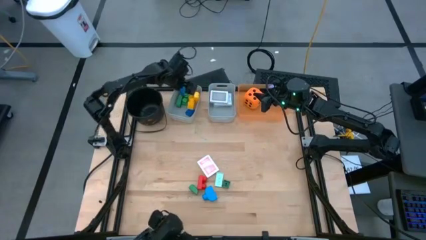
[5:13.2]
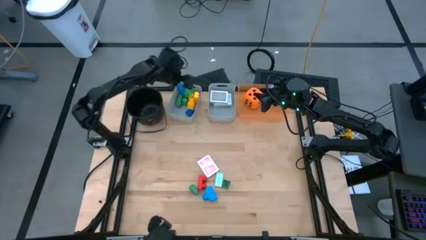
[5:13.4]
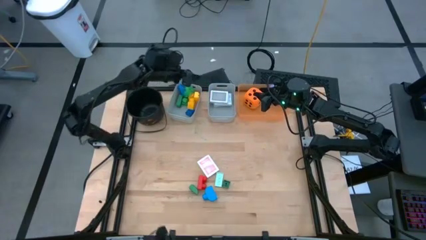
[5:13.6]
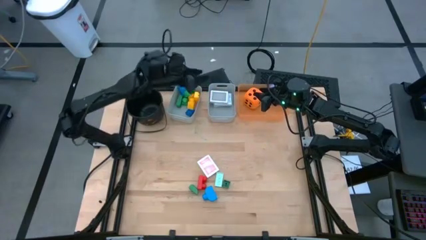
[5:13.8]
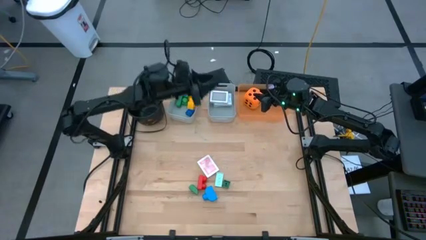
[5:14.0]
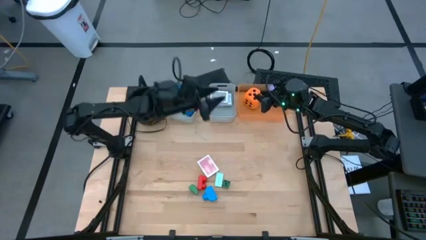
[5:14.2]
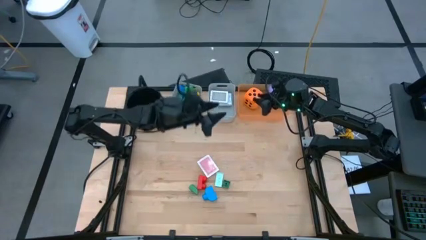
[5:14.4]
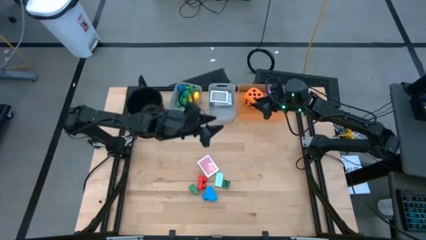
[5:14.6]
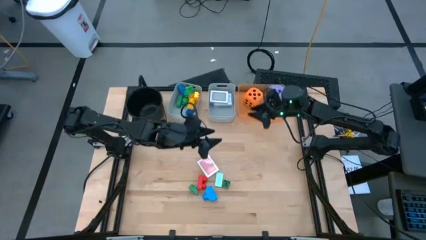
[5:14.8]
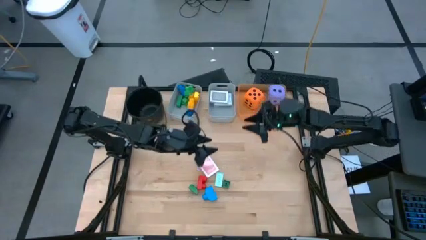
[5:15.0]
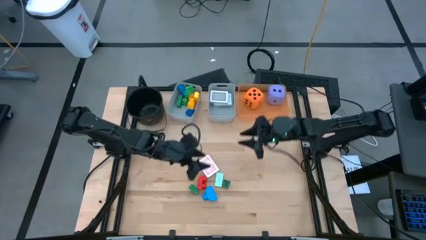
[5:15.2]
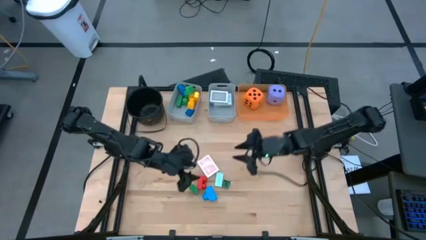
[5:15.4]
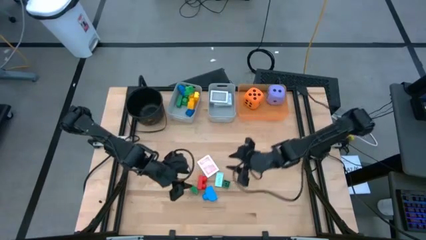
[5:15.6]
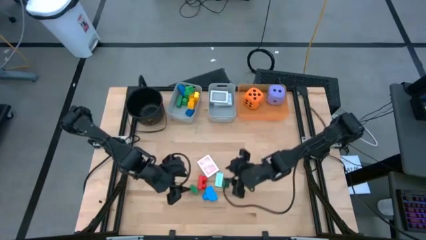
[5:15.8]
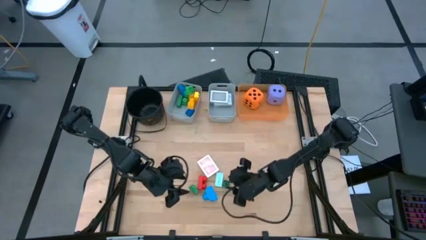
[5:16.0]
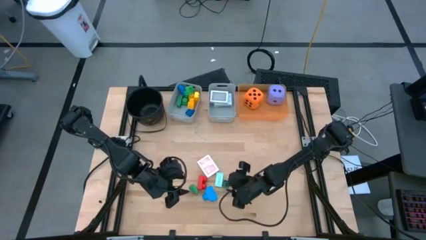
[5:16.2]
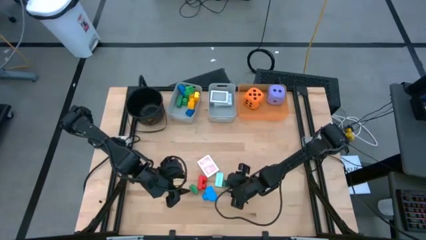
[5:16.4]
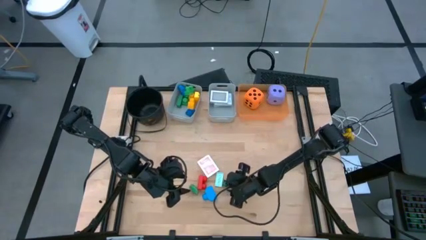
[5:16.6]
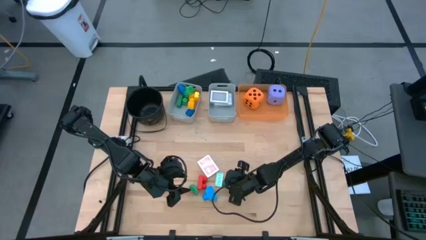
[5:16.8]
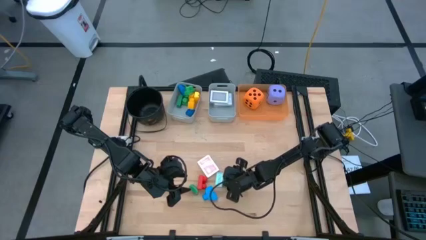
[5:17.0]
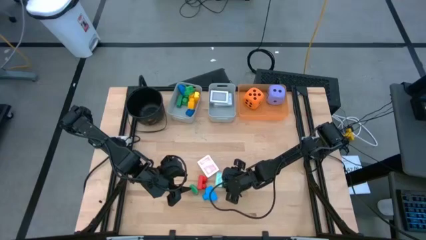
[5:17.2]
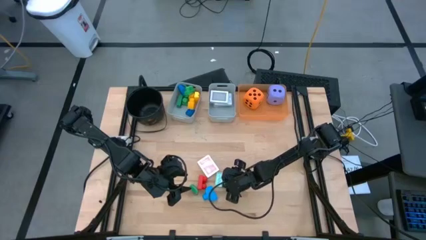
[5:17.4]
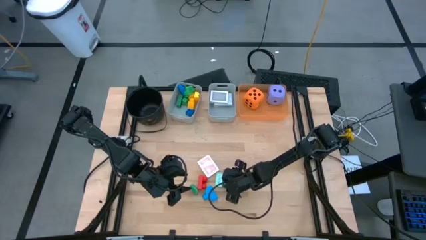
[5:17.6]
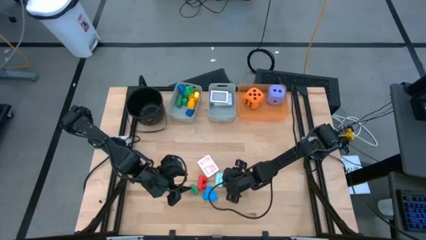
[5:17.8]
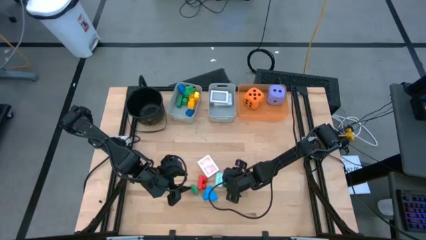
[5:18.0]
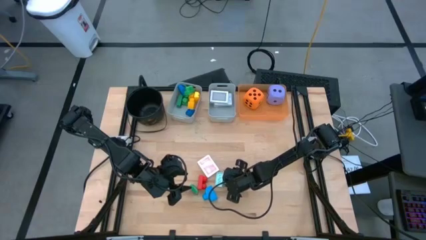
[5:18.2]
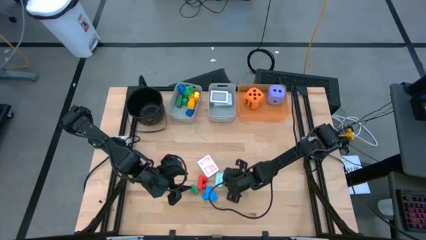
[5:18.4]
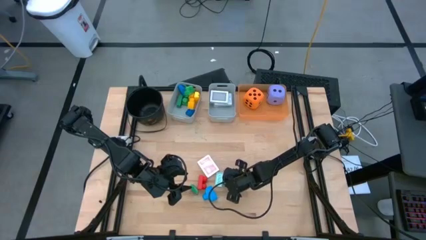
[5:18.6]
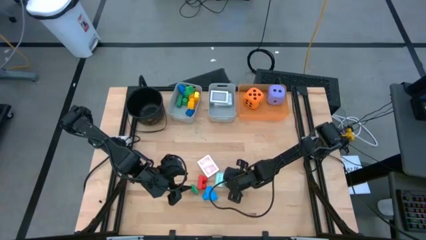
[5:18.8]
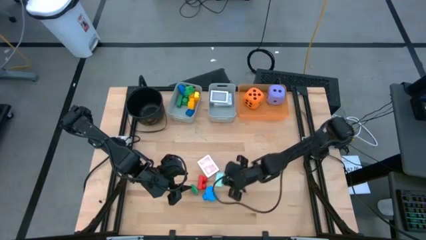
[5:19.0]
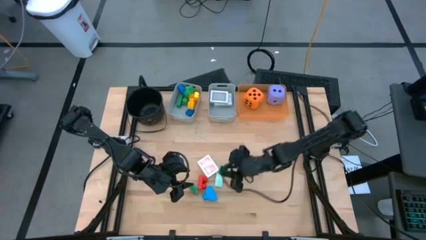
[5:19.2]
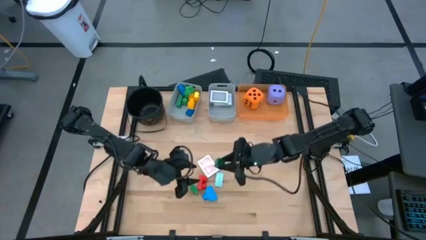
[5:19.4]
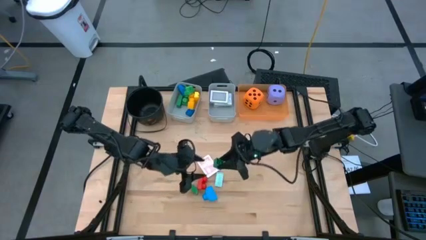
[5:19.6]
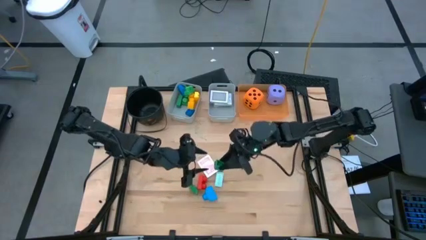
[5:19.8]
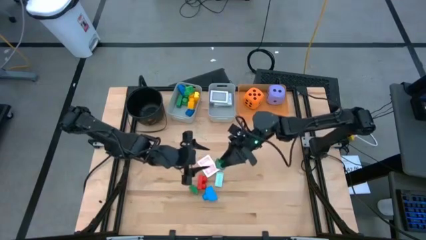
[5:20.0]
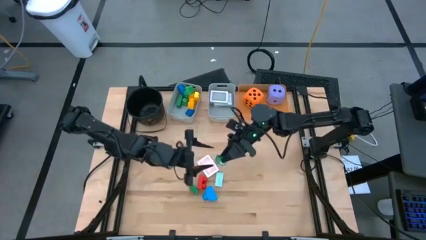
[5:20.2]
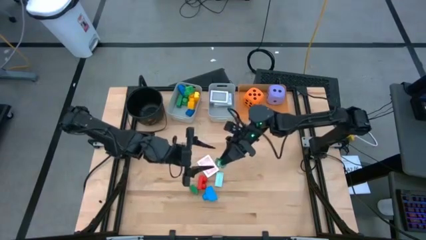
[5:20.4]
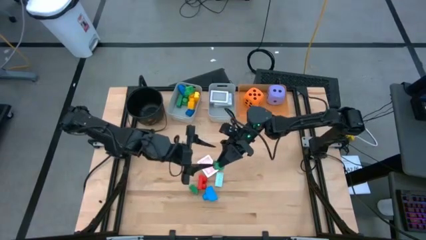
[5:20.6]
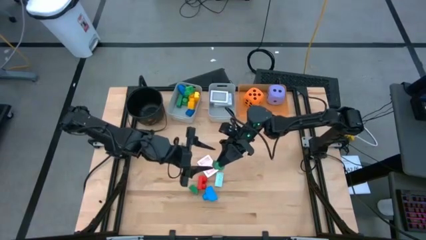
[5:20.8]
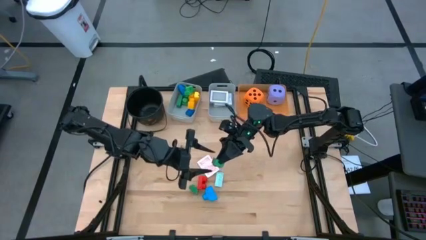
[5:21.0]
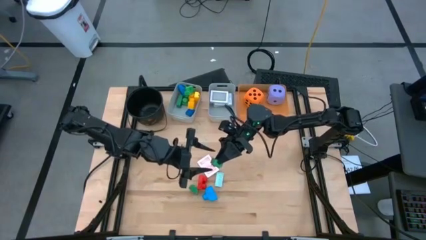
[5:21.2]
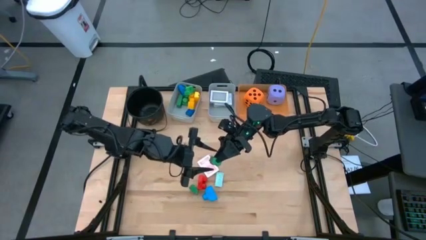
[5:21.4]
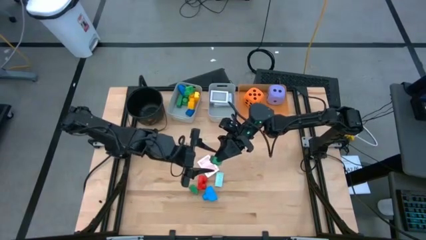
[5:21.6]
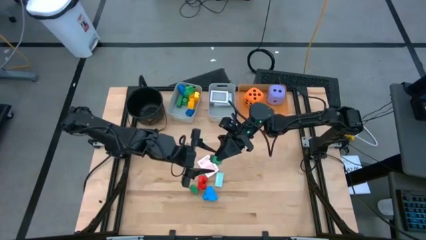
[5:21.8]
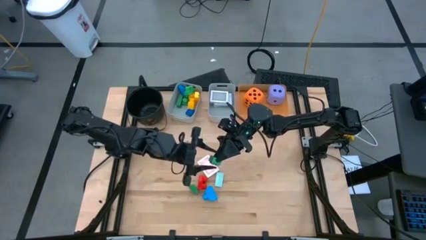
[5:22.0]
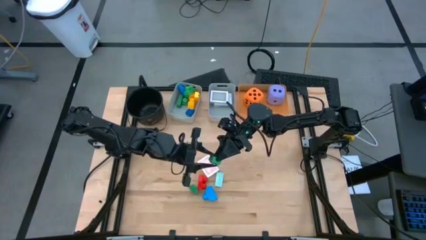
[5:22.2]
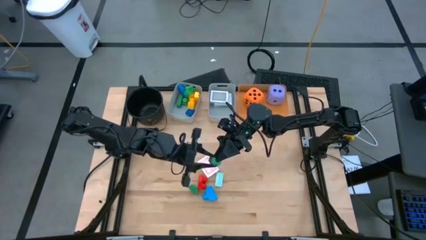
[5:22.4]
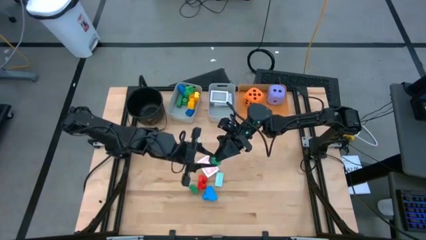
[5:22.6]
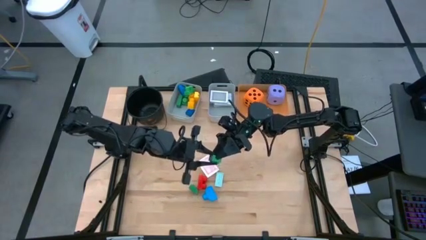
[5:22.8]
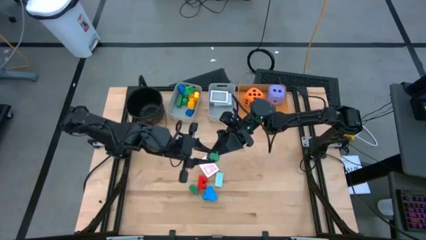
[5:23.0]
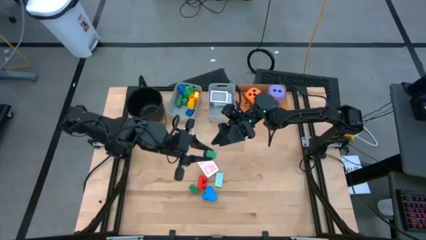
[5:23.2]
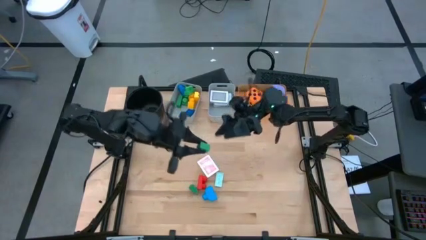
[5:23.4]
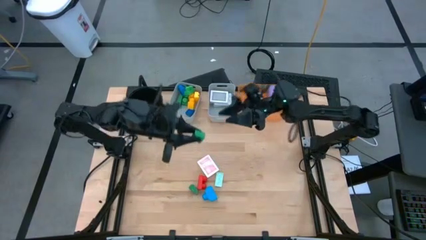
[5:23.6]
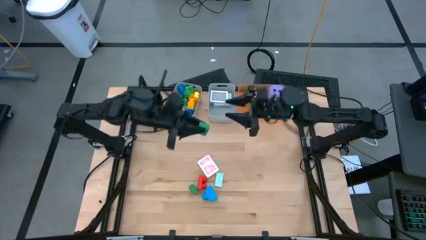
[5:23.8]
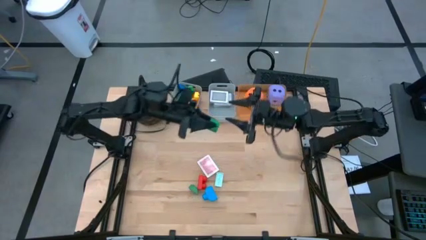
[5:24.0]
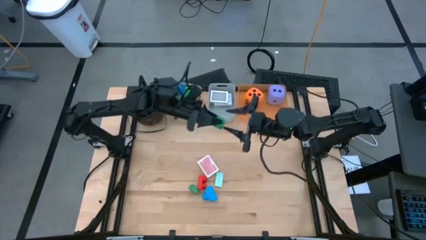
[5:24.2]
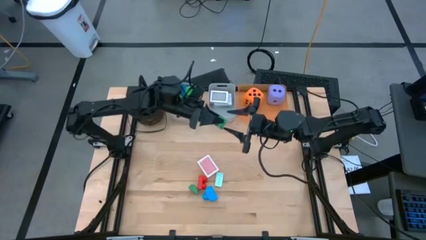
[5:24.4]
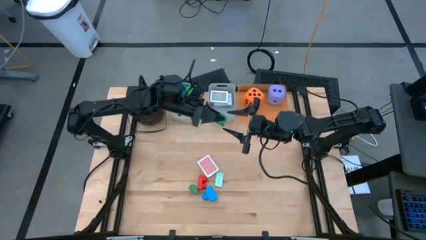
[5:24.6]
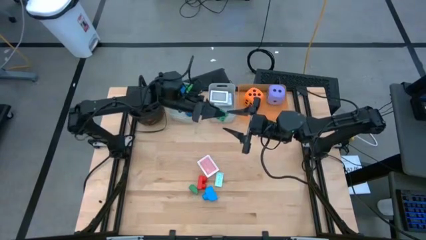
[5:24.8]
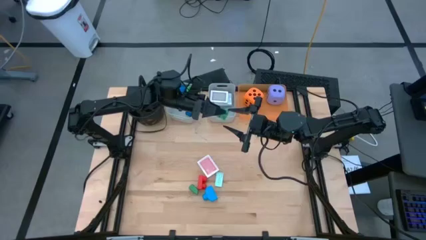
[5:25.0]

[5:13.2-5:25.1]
Task: Pick & Place Toys
Put the green game piece into the left gray bin
